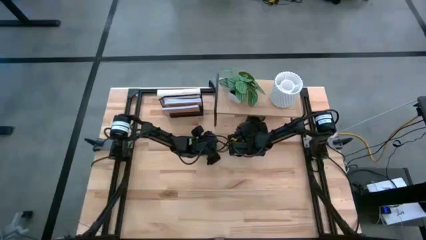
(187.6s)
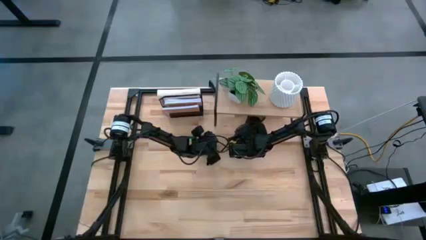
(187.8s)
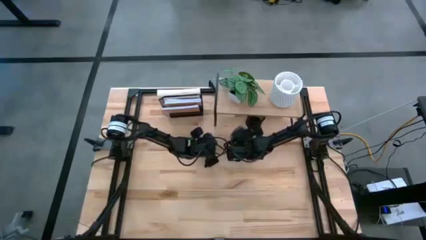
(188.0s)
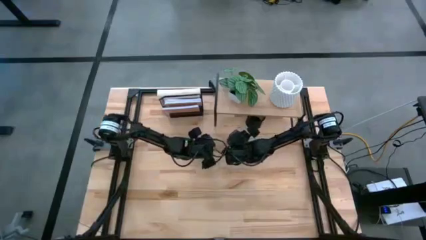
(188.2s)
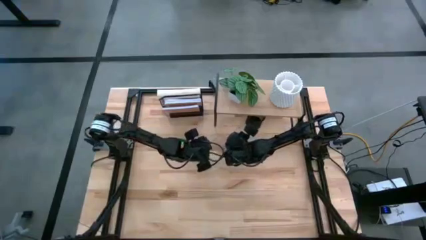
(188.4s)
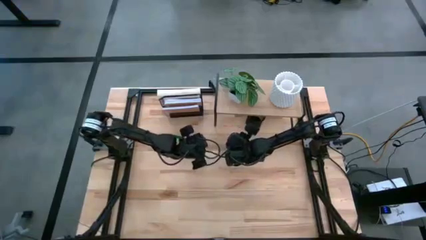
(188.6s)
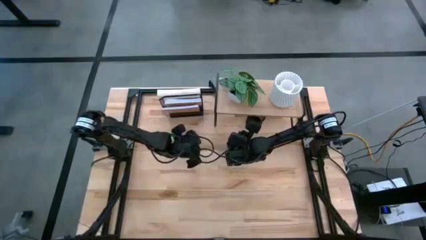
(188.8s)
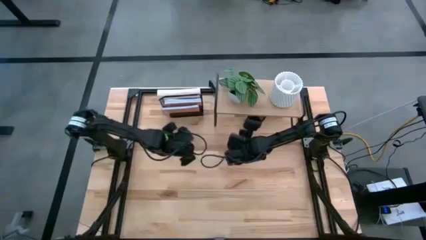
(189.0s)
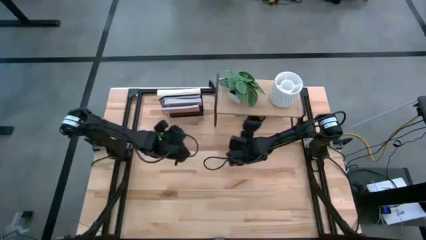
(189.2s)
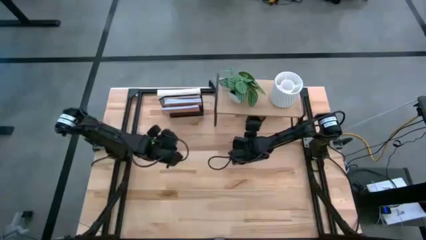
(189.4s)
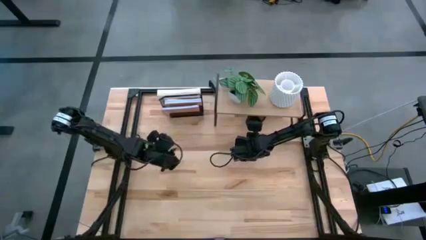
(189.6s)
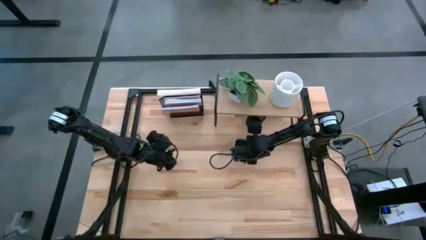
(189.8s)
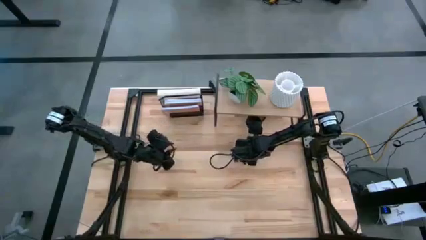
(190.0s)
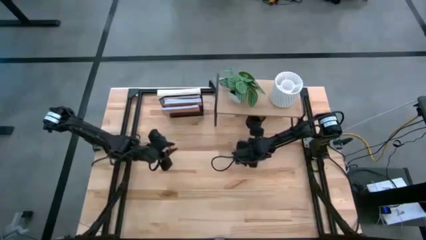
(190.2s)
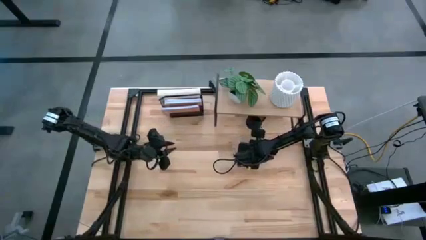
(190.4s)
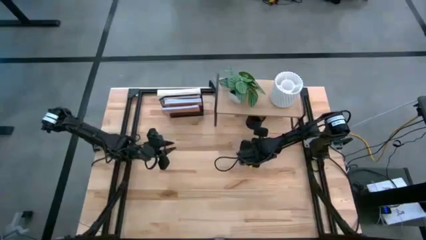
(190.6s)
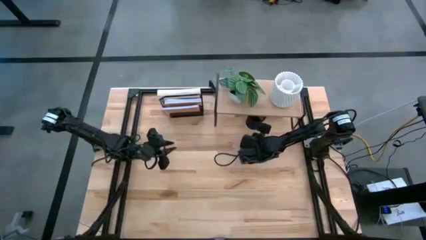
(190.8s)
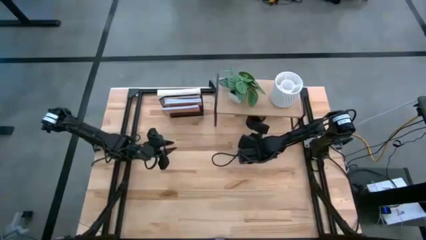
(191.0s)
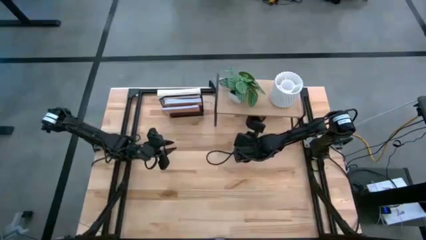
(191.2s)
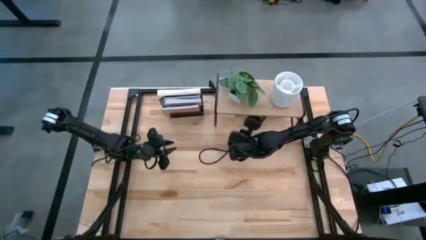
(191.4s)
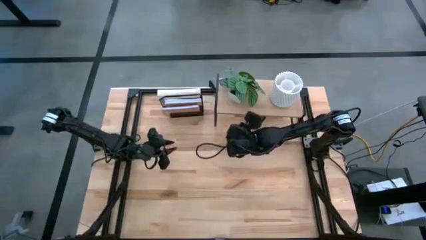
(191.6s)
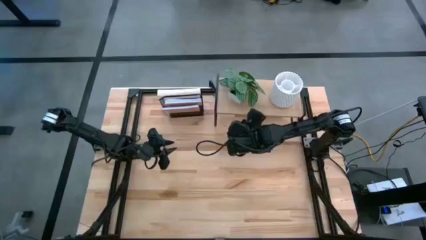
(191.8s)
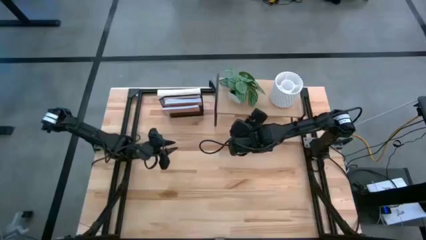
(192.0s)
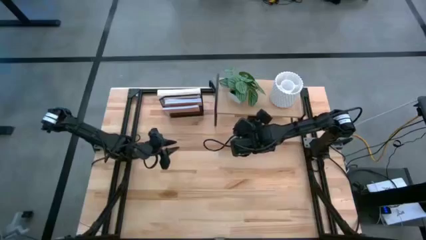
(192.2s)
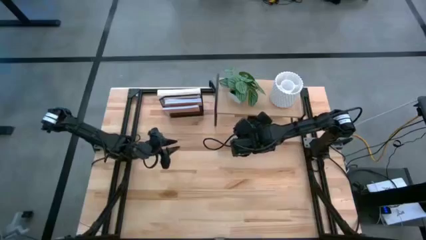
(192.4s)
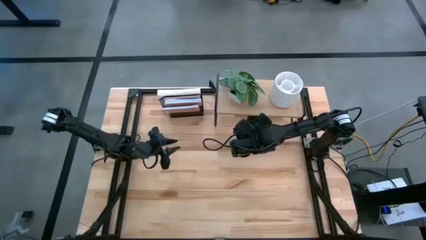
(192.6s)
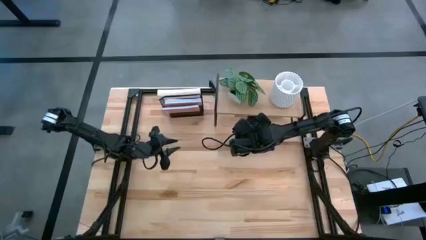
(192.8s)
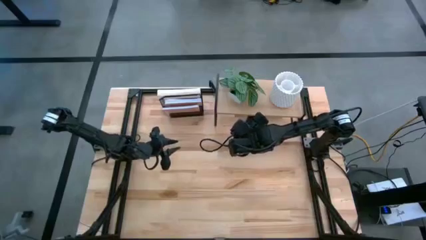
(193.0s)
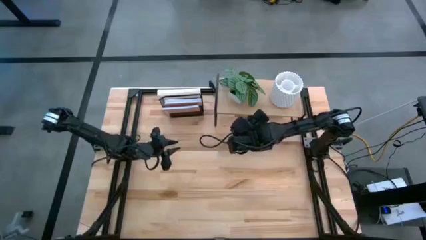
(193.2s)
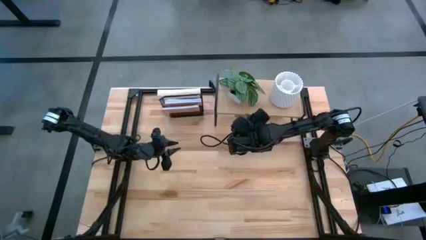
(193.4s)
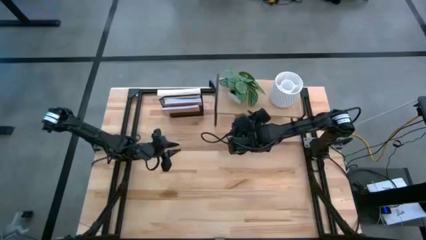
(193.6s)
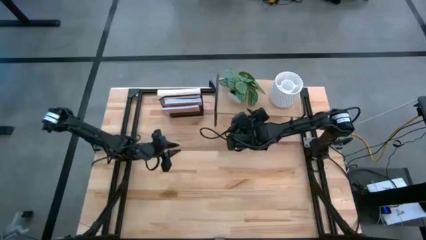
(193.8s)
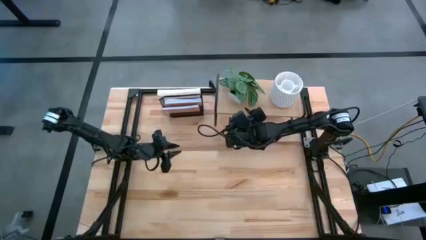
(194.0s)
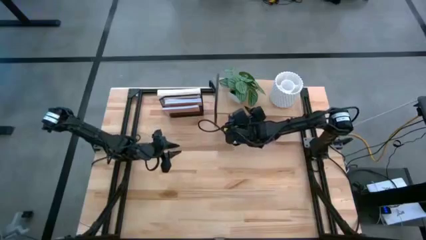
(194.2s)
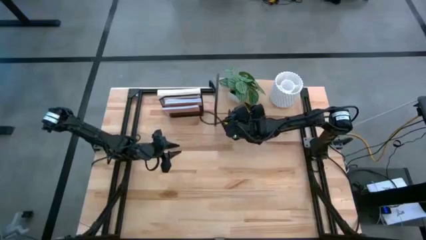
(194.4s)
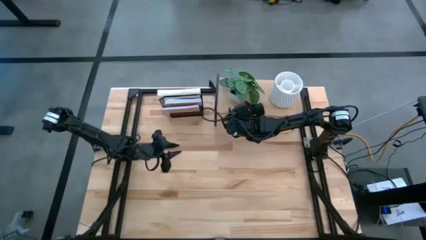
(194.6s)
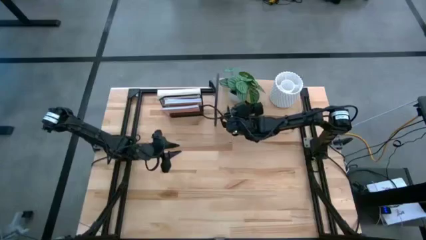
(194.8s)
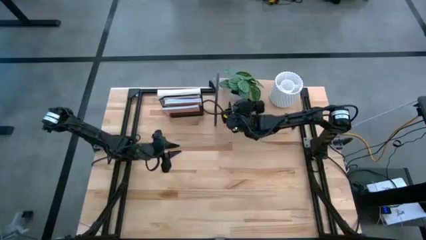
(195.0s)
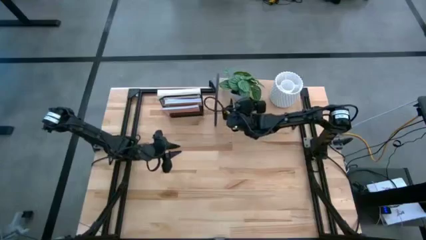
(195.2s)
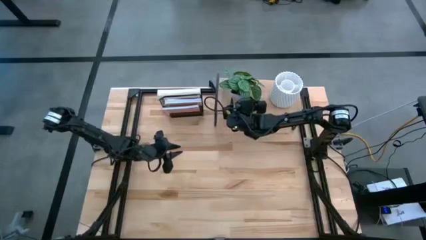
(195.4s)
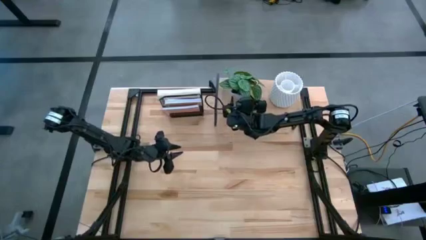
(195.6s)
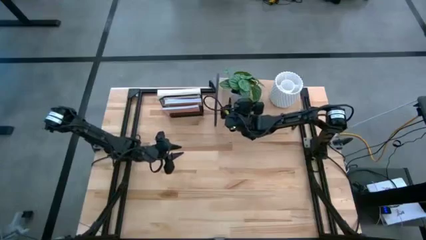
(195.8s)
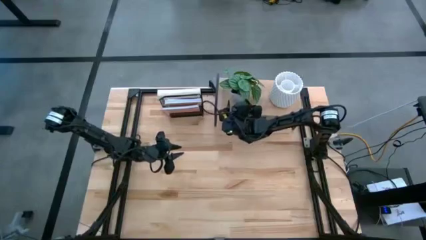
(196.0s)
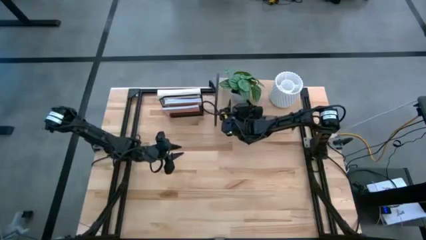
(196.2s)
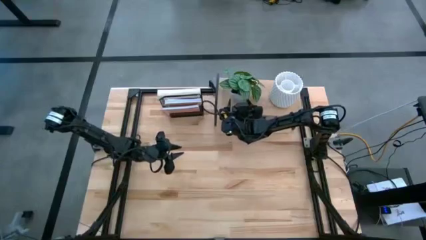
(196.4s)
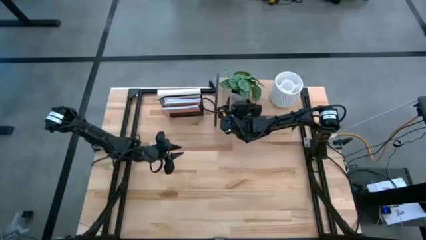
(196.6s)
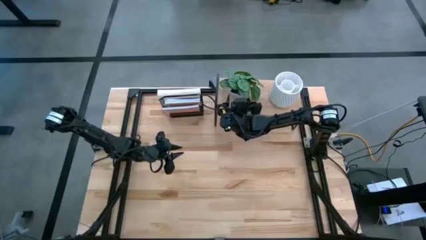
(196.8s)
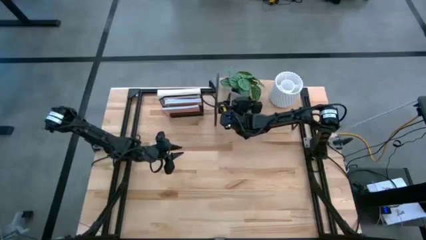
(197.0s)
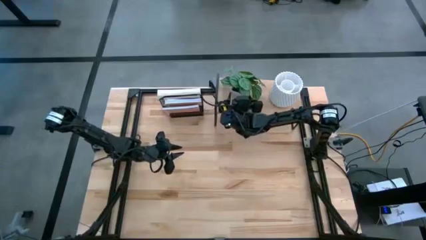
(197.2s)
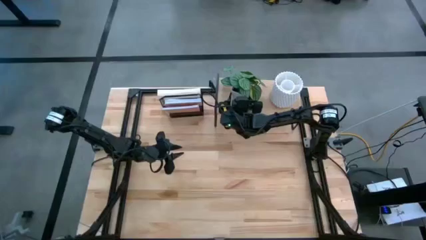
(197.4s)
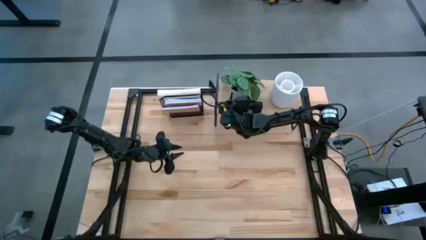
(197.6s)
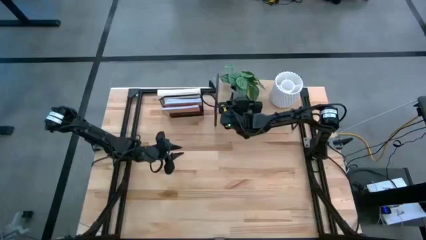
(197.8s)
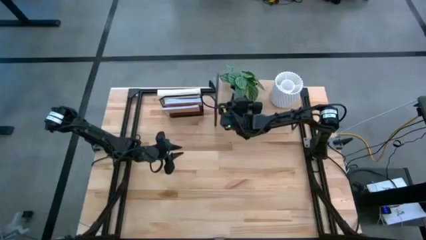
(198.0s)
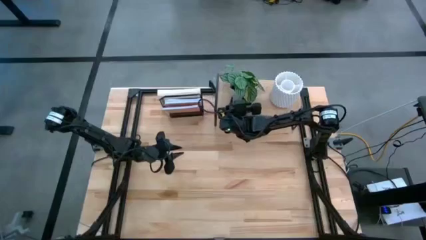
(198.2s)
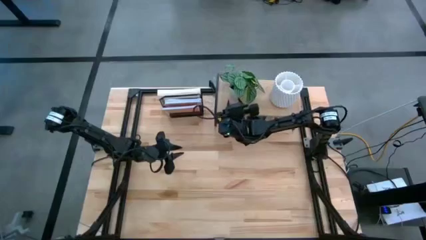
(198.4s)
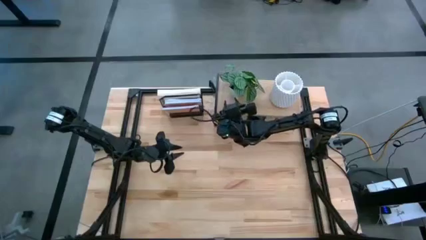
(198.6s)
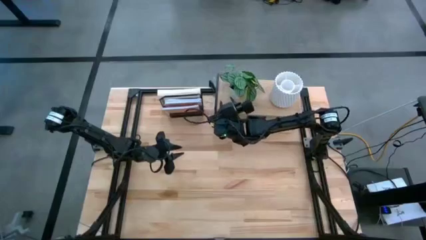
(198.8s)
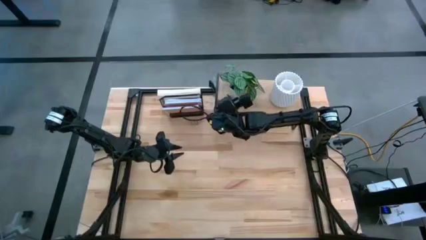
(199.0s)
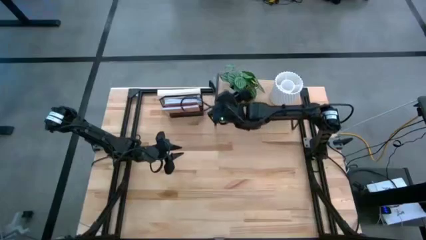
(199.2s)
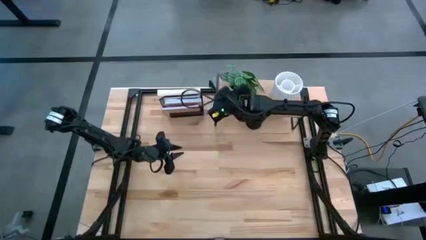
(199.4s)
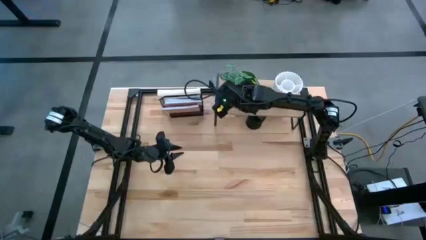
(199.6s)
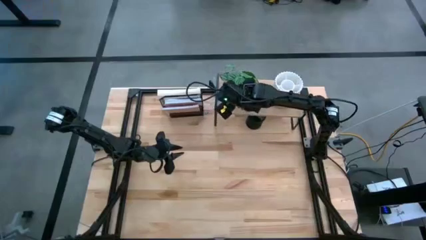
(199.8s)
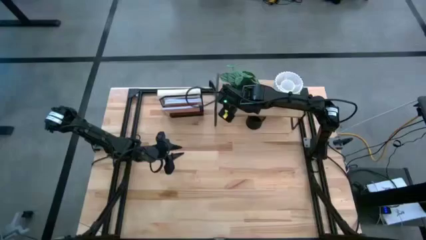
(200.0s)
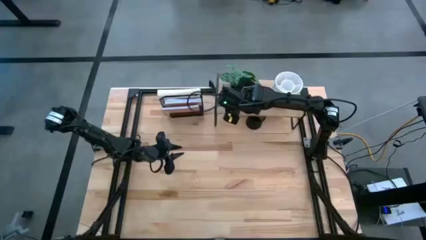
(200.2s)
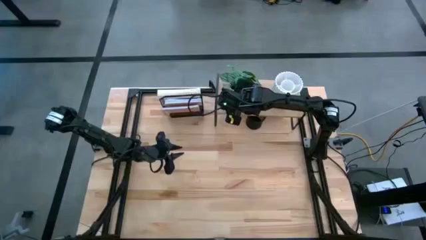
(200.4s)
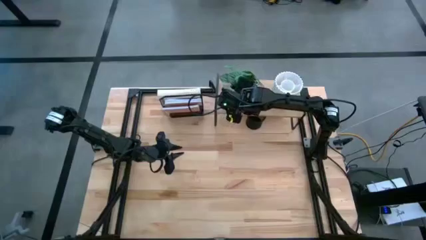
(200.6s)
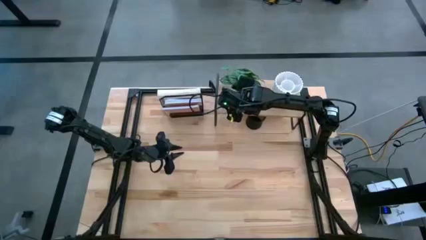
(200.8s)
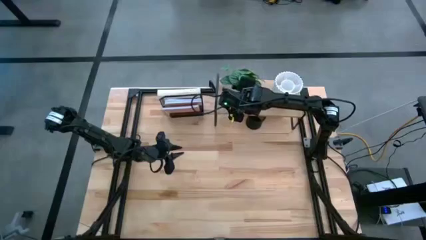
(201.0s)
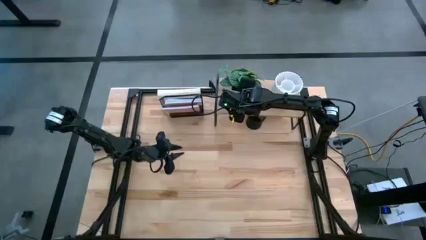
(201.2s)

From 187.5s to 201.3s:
Task: Stock shelves
Remove the white potted plant from the shelf
